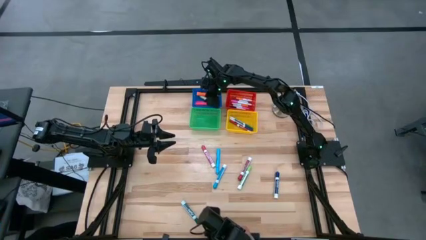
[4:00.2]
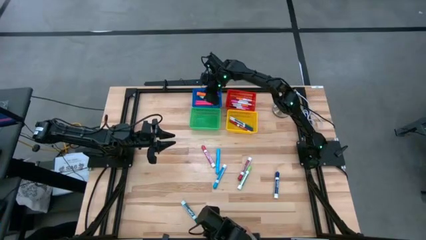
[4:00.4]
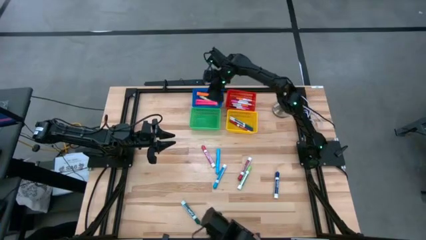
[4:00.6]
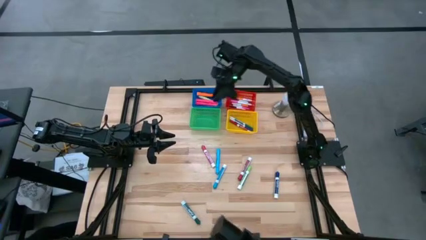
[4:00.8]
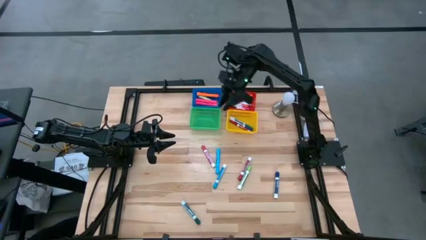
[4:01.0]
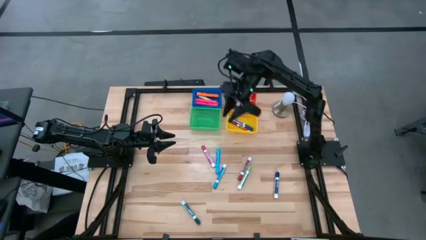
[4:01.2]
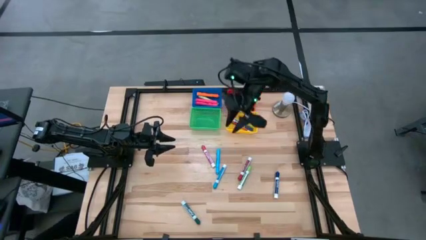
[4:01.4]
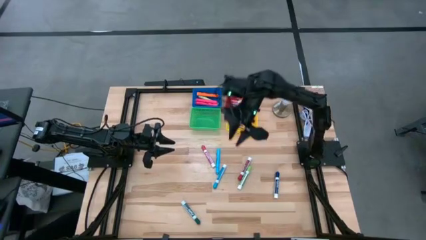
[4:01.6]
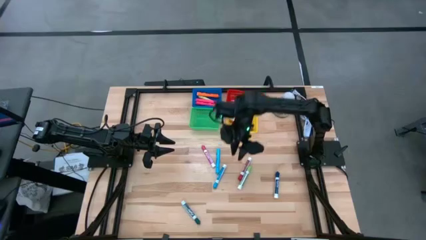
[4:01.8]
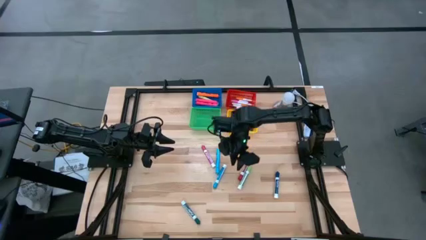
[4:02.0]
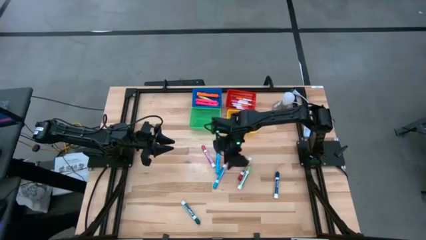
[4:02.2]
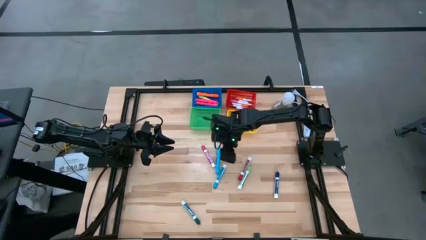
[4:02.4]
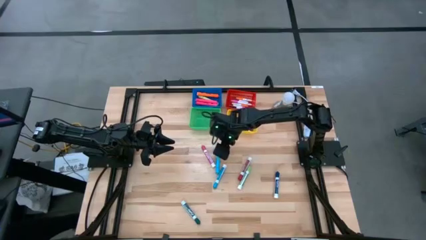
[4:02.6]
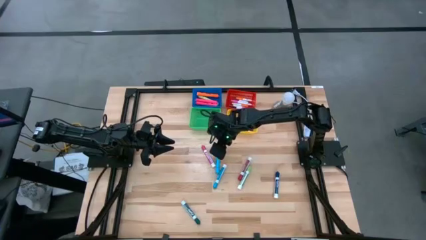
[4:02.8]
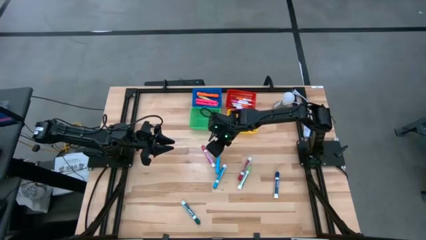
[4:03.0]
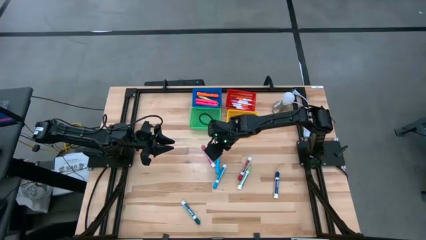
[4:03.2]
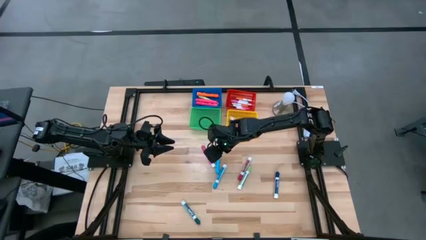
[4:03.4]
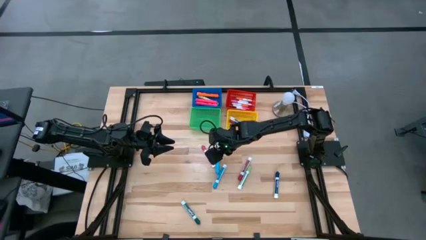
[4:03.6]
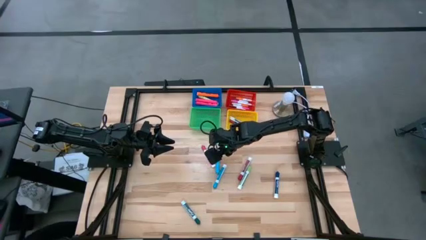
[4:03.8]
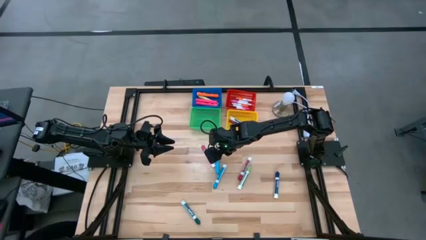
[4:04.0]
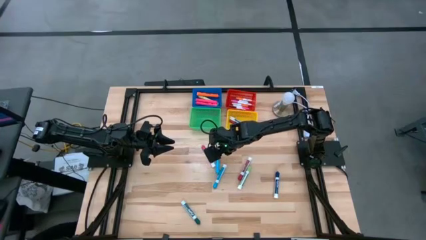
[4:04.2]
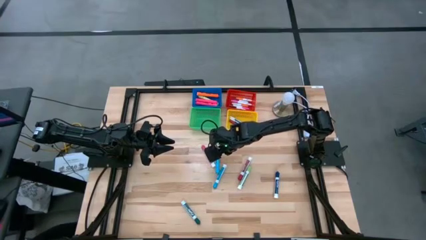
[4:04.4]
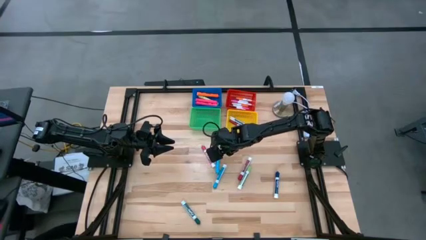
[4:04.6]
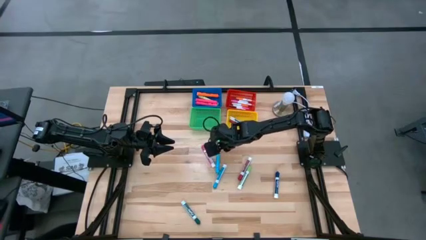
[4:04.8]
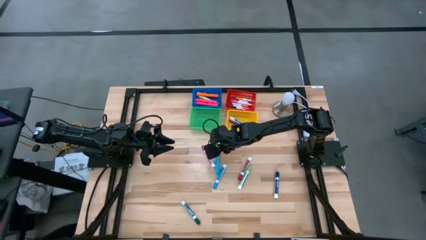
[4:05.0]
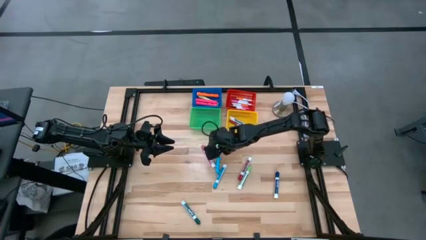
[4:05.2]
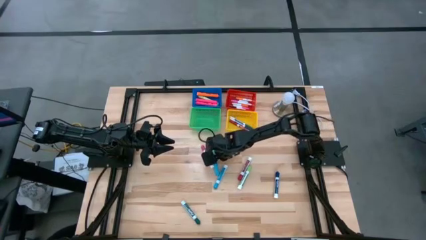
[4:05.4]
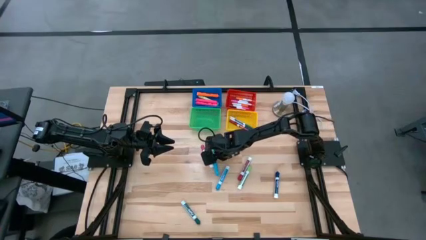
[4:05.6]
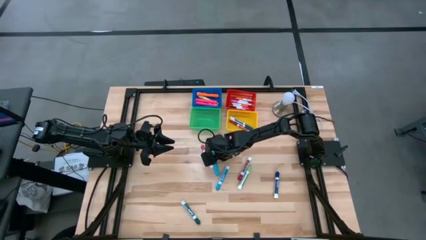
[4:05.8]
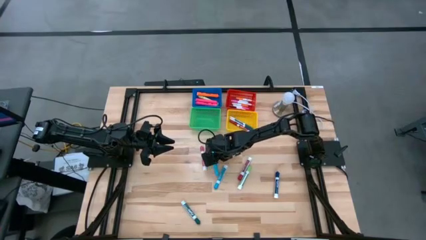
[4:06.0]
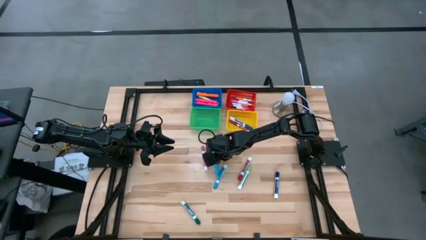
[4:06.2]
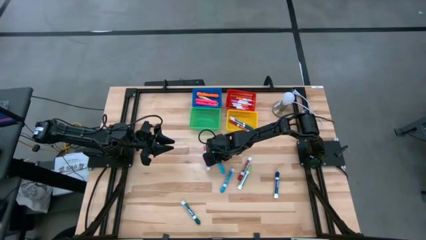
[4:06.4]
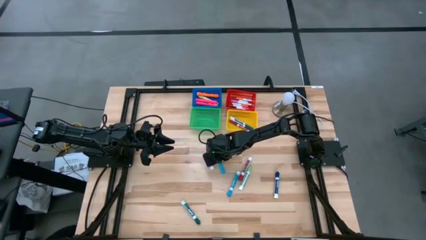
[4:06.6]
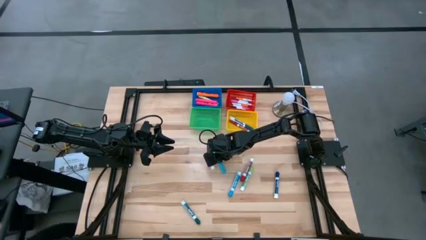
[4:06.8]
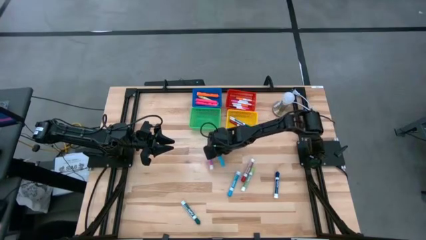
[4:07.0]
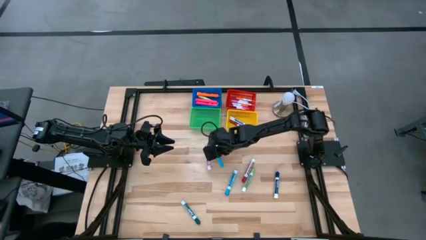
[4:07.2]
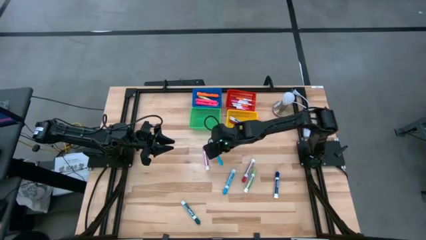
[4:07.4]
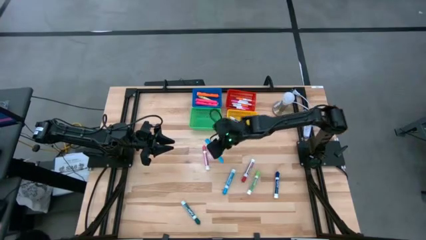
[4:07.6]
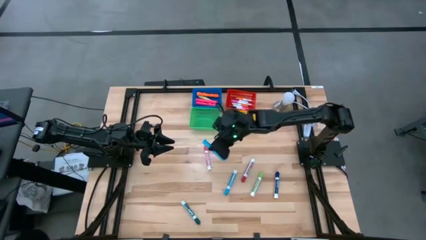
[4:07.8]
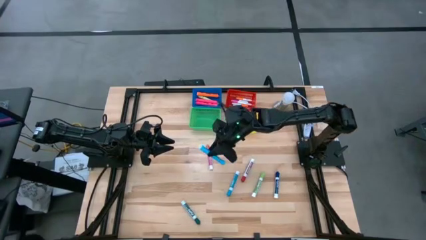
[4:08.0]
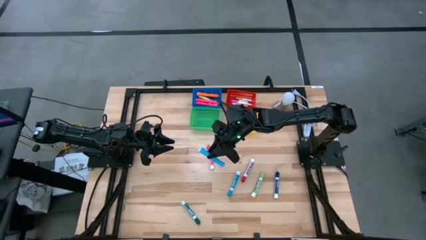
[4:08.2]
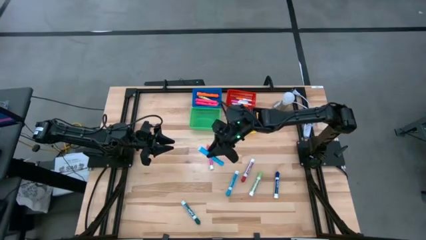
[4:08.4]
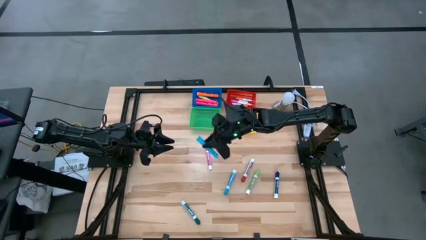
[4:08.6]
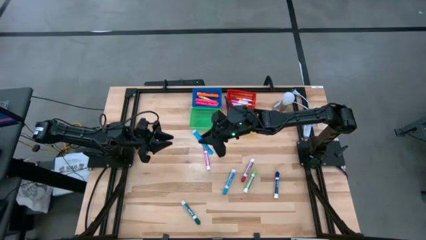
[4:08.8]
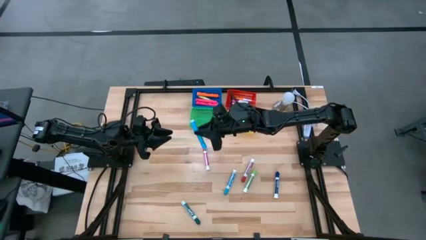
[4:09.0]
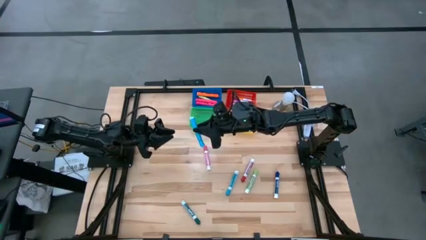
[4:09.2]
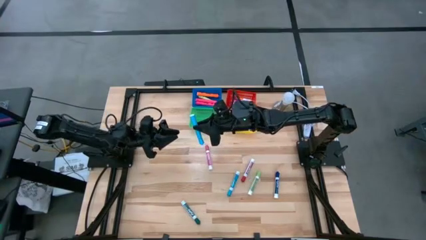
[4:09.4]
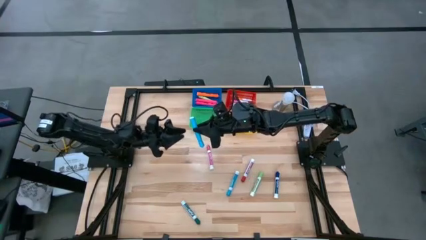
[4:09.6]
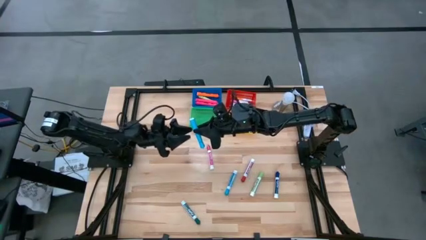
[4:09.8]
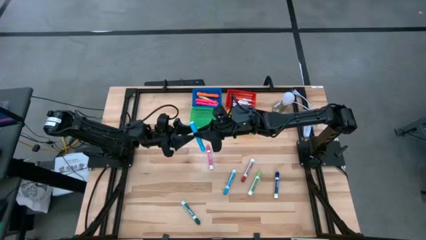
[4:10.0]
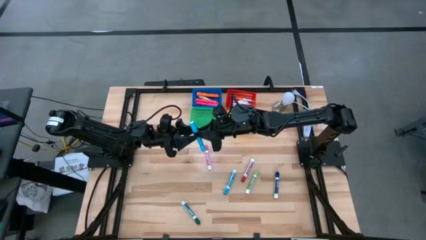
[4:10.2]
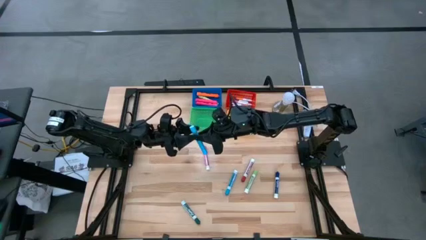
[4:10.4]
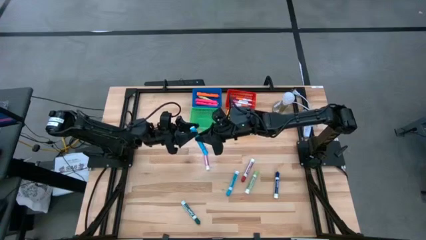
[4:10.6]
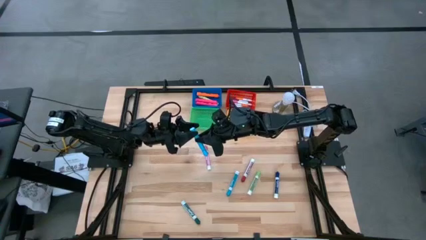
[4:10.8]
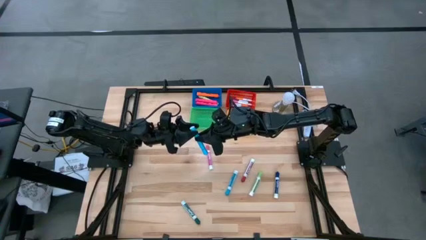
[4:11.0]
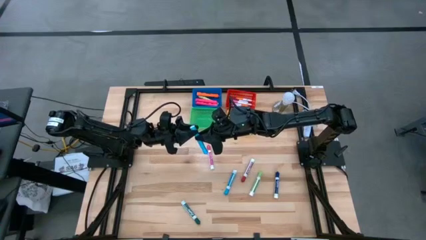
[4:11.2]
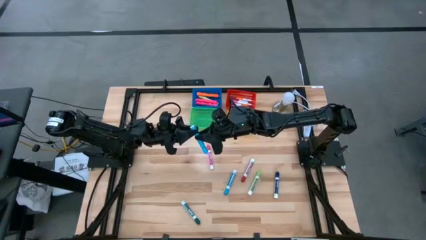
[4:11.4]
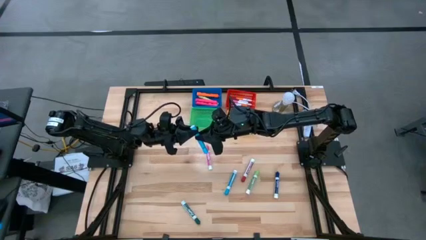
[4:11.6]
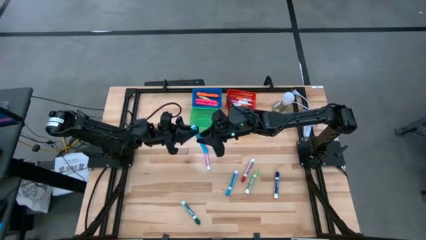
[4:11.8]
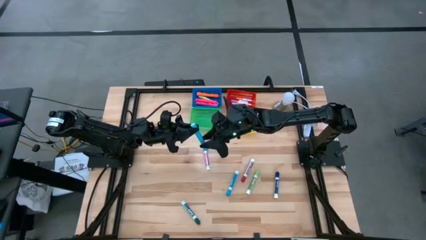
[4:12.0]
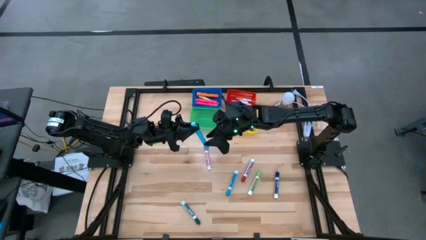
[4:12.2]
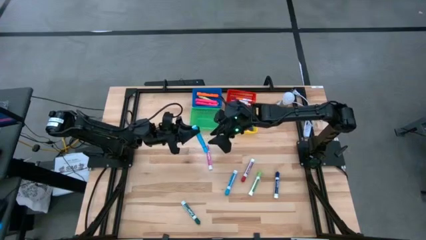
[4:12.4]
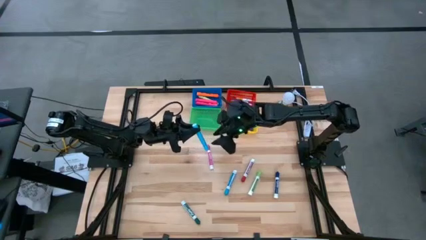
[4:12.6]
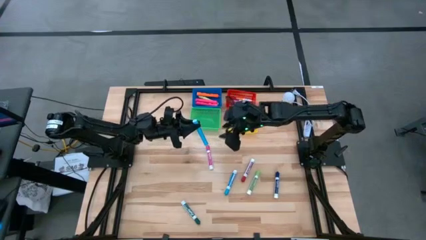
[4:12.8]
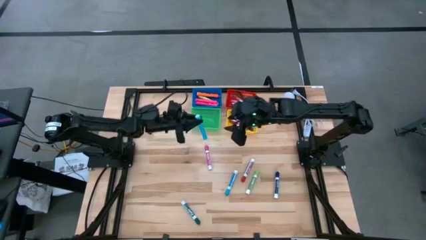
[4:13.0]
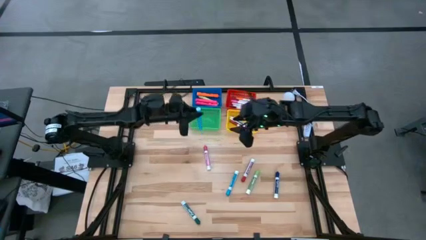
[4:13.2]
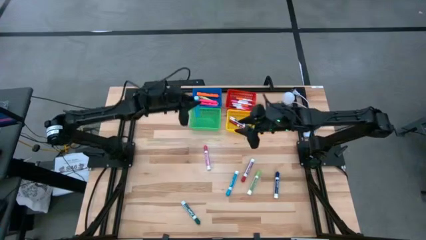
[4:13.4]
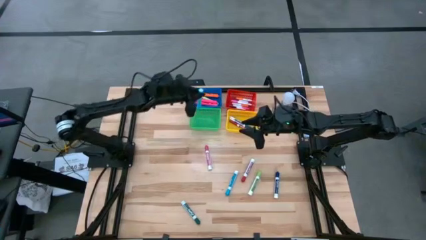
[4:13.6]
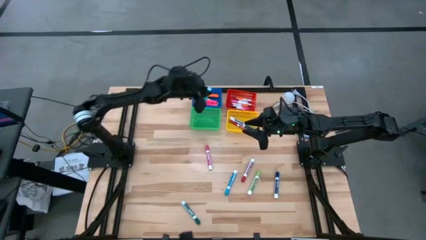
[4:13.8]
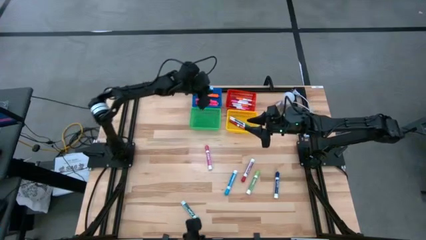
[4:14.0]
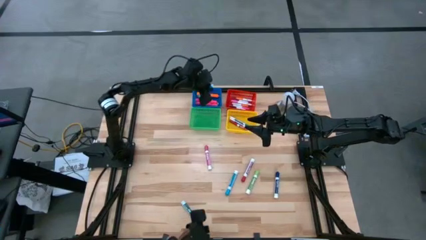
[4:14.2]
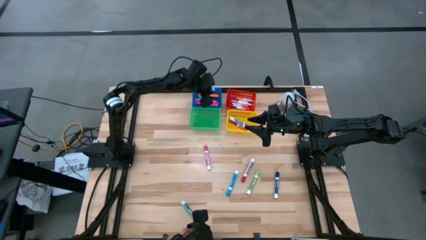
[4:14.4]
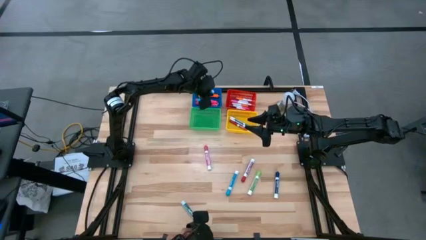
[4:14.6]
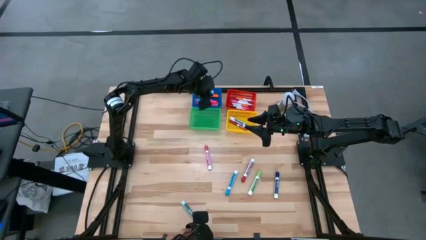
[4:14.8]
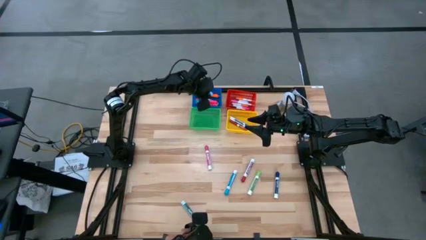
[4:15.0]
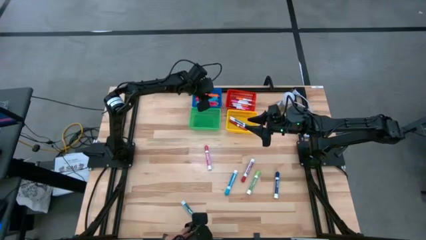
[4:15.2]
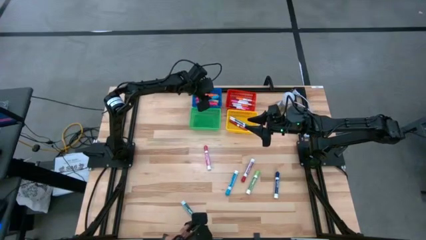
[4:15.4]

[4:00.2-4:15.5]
Task: Pick & Place Markers
Put the blue highlighter into the blue basket
